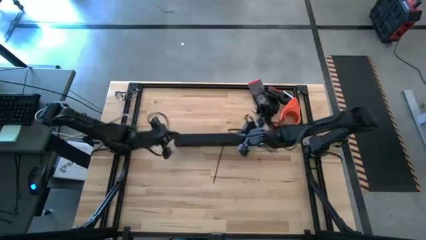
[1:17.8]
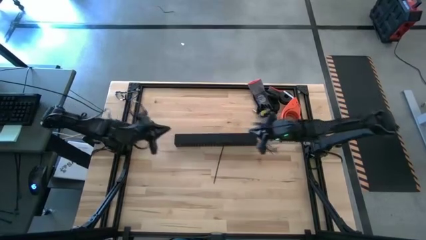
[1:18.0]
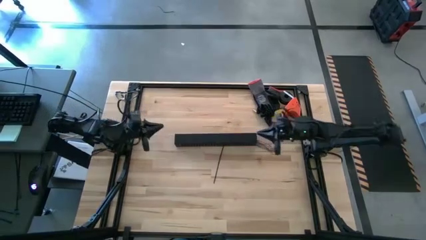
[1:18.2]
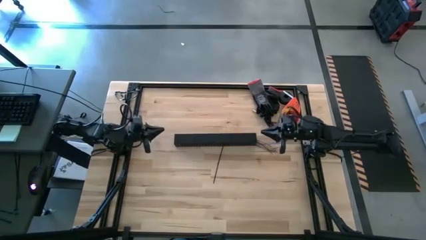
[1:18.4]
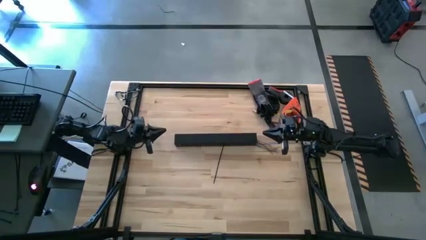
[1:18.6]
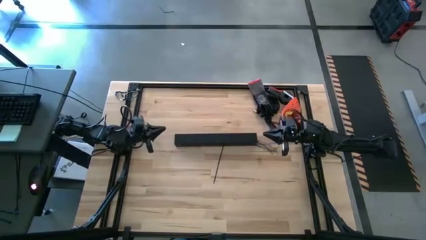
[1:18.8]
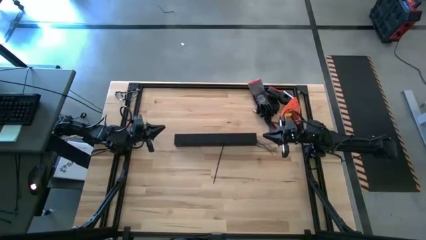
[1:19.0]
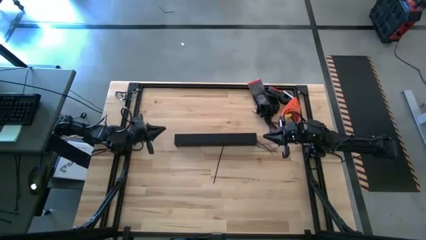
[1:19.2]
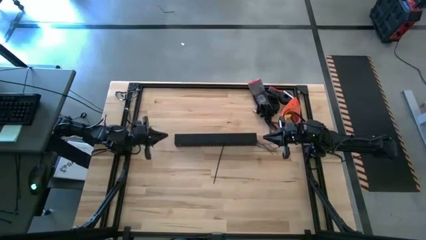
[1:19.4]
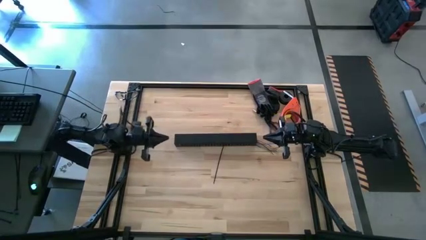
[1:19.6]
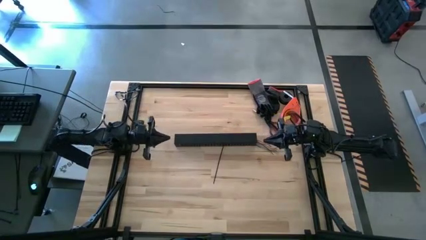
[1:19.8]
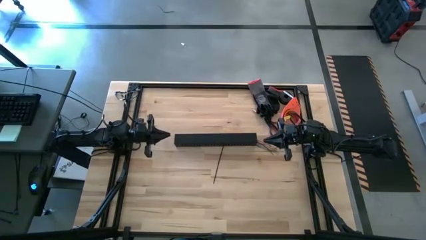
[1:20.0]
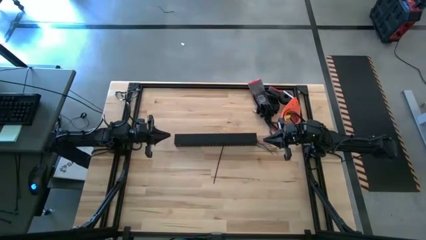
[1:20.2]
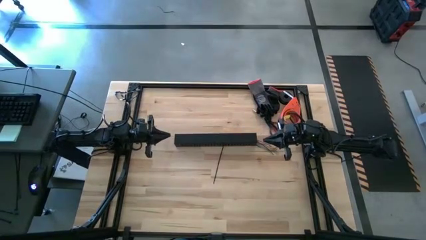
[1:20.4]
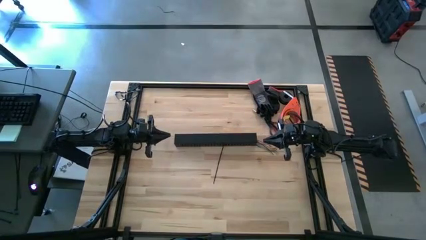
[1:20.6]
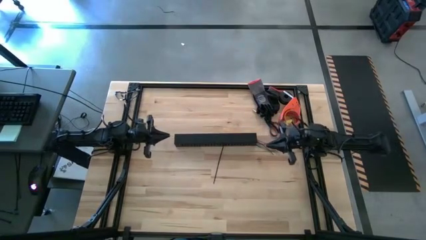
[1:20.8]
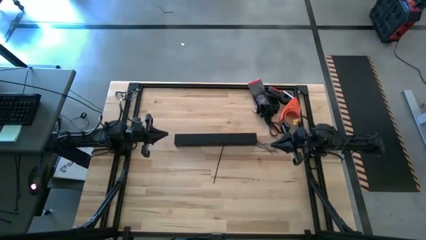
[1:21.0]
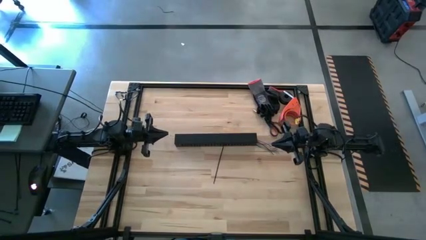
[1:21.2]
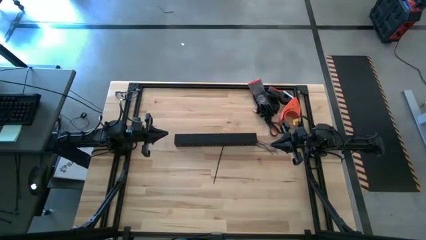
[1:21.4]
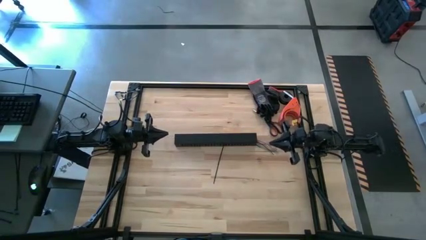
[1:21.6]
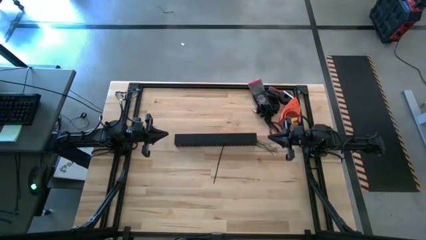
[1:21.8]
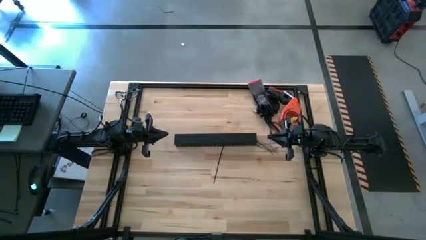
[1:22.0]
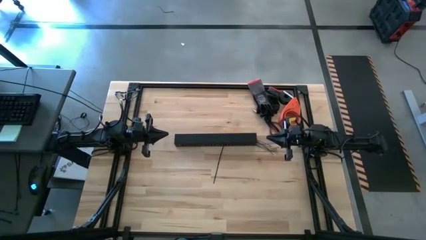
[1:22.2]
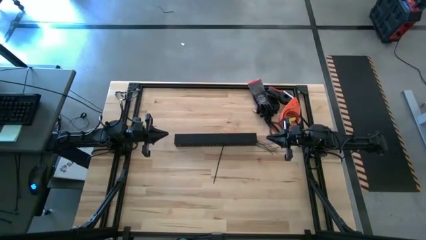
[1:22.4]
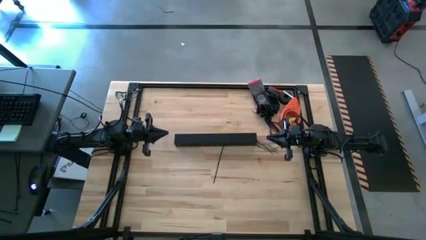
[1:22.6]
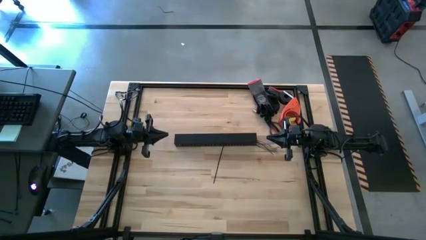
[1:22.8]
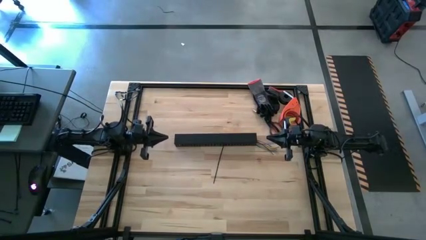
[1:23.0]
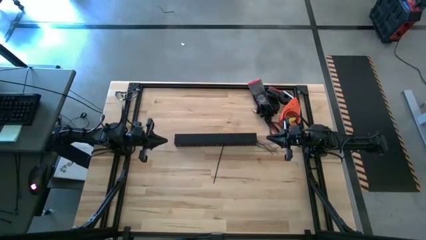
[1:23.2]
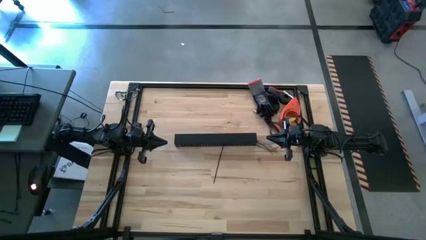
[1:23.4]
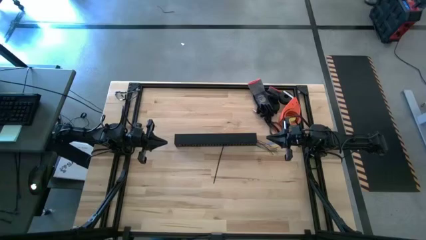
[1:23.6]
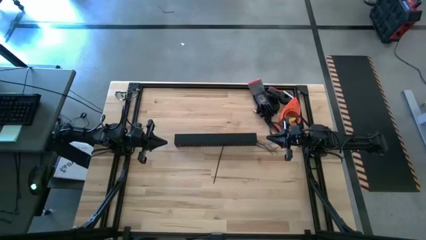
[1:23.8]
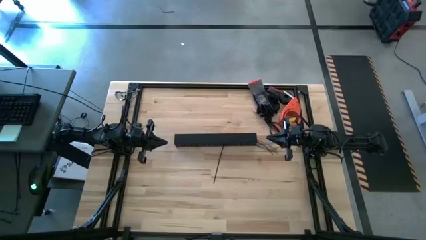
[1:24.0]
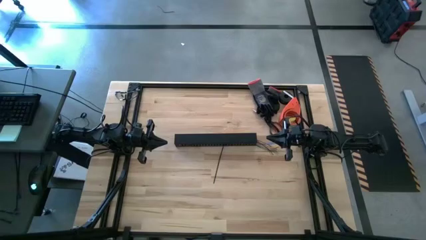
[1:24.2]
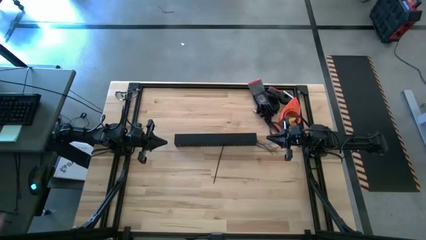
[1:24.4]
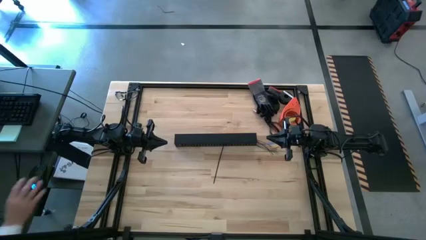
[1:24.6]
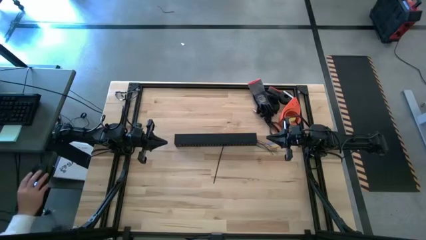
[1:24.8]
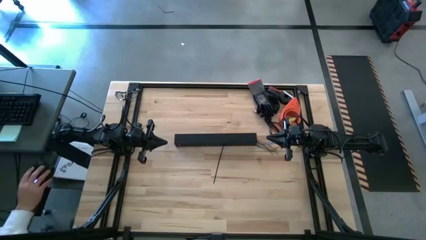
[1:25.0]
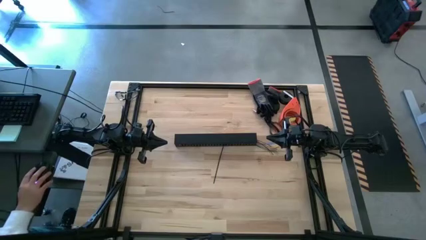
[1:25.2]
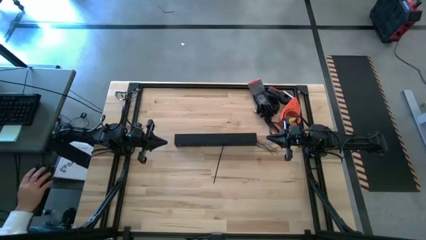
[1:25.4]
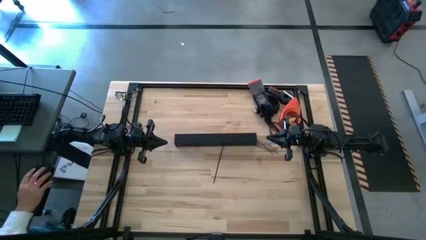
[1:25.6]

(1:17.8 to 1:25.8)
Task: Ziptie cables
Return to Home Position

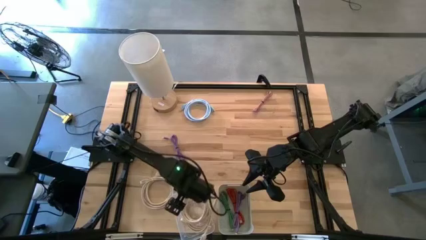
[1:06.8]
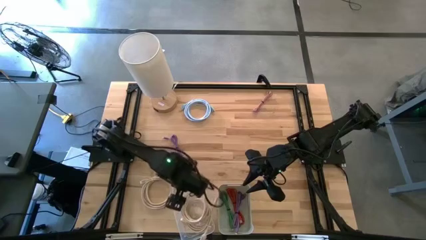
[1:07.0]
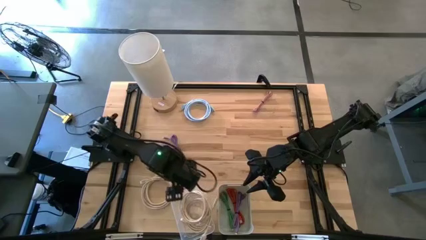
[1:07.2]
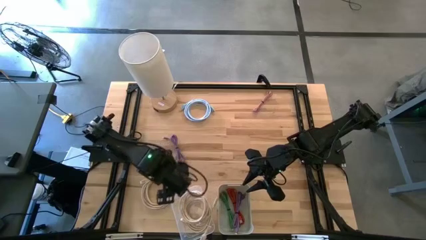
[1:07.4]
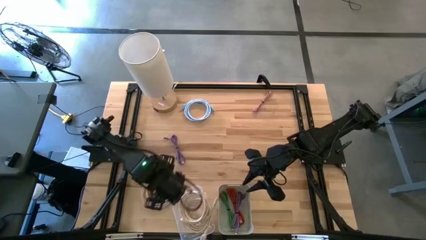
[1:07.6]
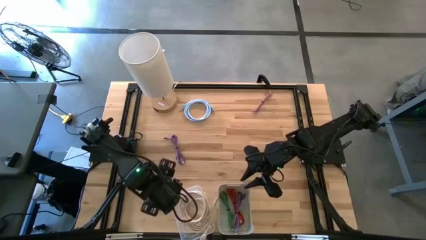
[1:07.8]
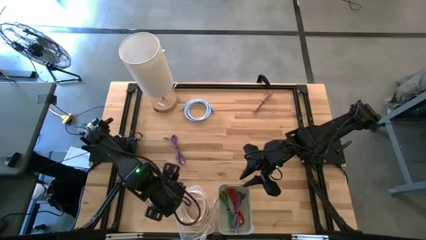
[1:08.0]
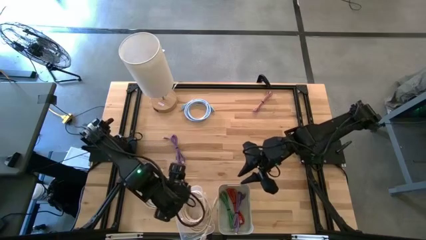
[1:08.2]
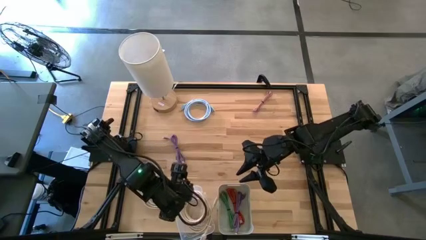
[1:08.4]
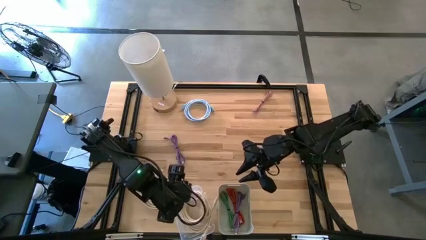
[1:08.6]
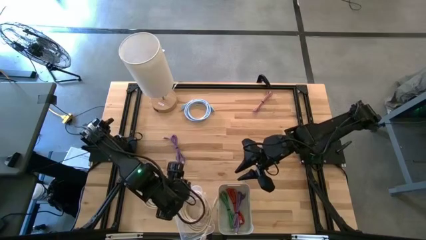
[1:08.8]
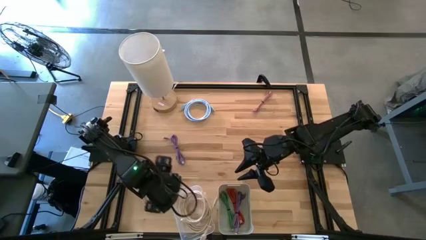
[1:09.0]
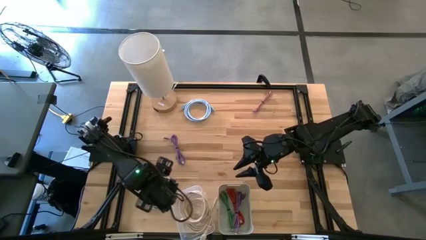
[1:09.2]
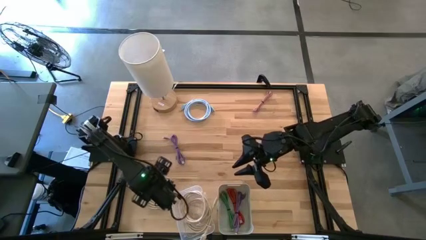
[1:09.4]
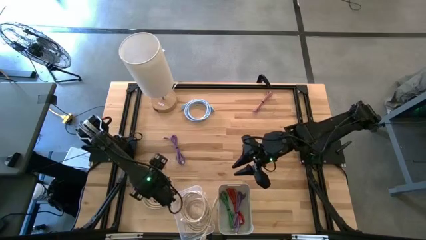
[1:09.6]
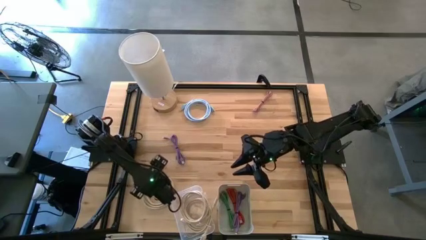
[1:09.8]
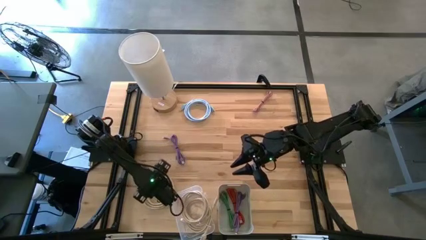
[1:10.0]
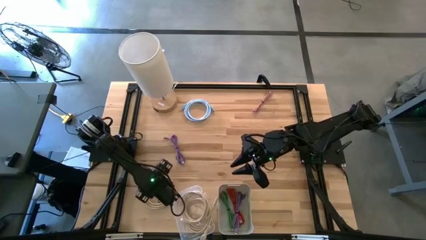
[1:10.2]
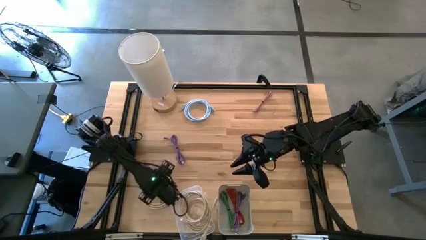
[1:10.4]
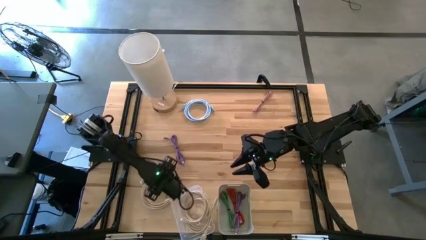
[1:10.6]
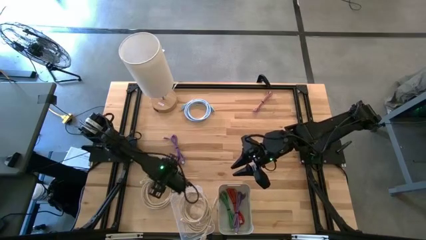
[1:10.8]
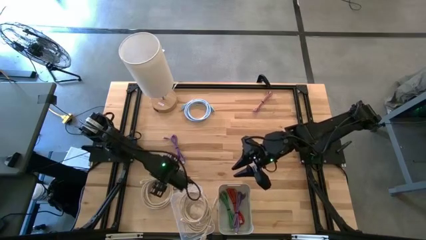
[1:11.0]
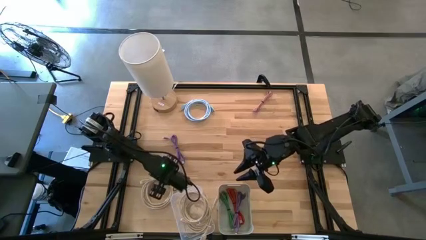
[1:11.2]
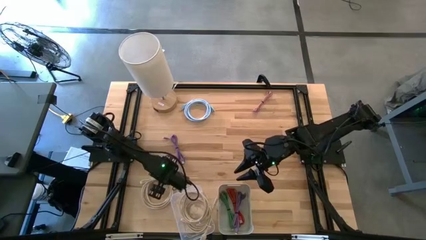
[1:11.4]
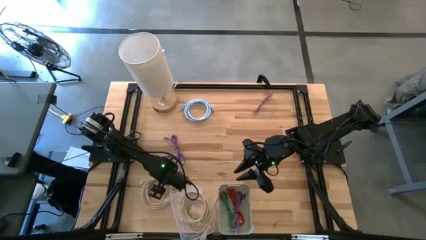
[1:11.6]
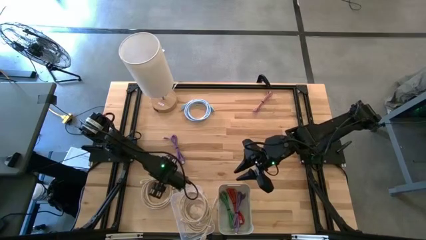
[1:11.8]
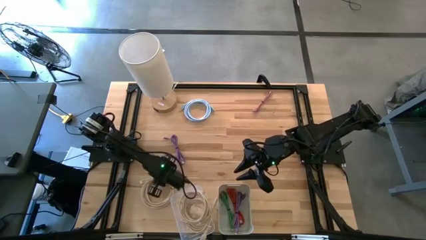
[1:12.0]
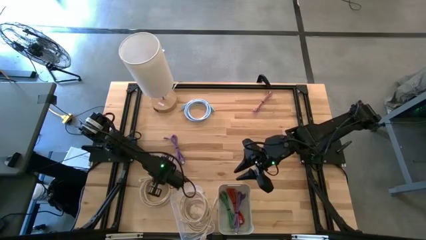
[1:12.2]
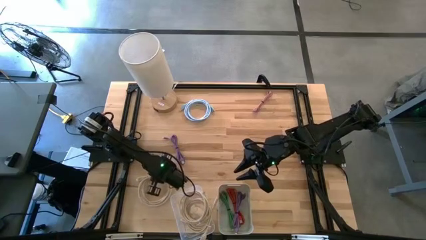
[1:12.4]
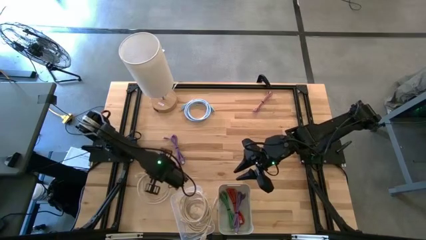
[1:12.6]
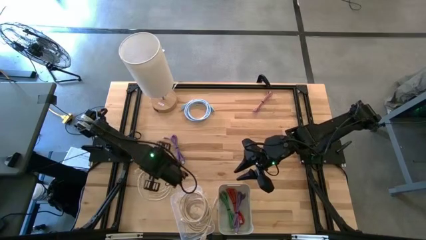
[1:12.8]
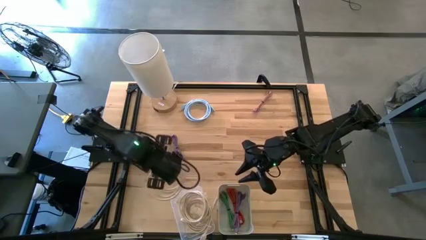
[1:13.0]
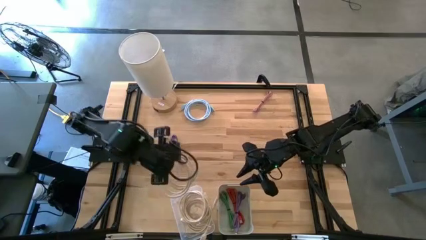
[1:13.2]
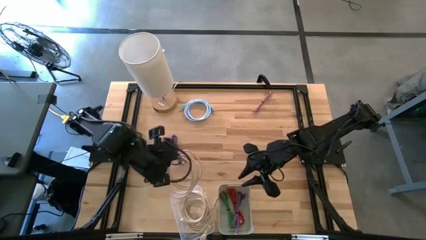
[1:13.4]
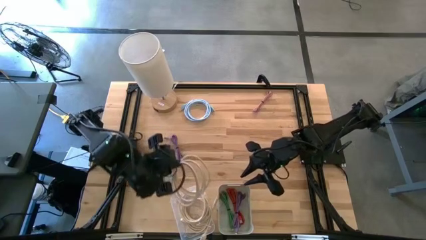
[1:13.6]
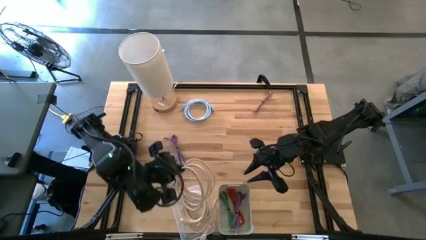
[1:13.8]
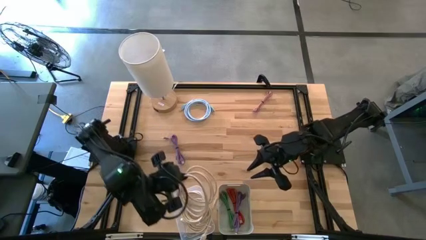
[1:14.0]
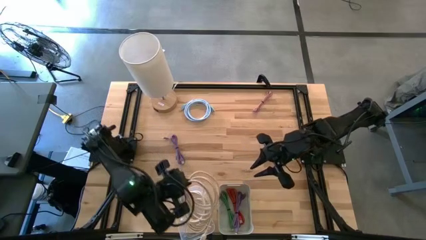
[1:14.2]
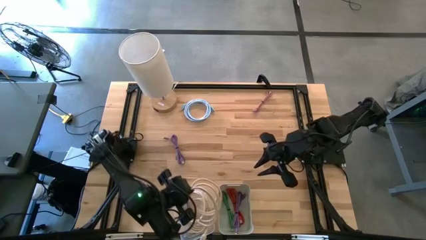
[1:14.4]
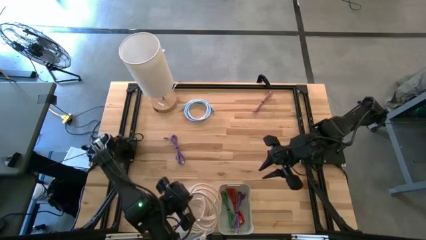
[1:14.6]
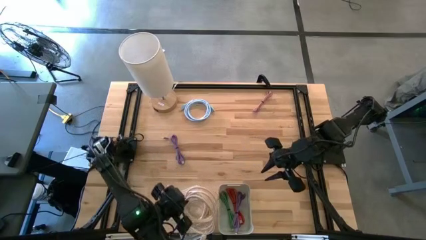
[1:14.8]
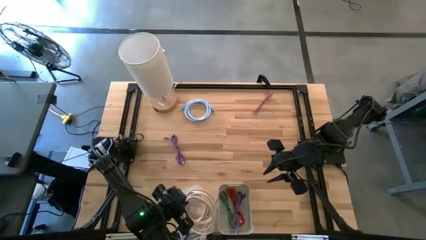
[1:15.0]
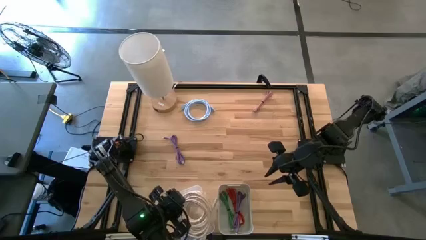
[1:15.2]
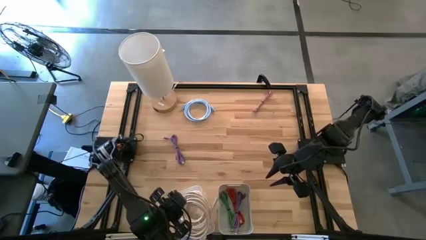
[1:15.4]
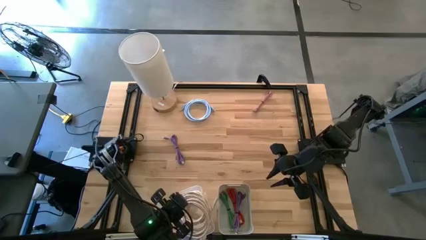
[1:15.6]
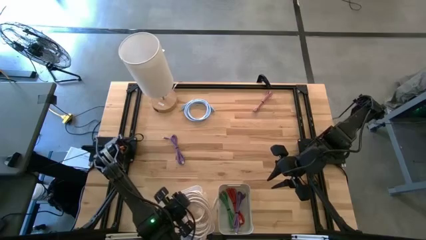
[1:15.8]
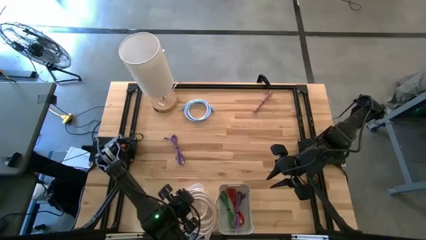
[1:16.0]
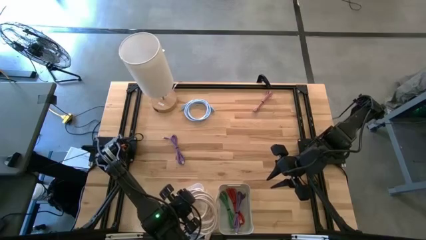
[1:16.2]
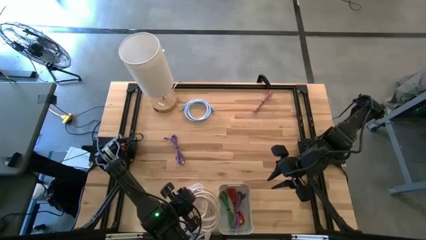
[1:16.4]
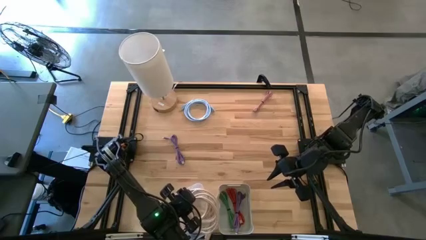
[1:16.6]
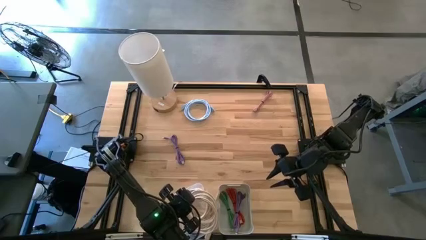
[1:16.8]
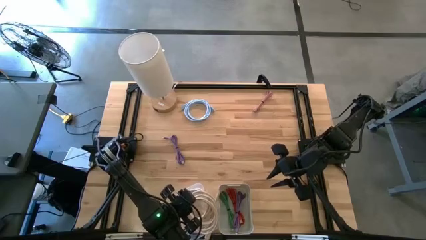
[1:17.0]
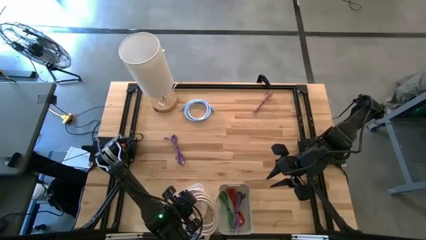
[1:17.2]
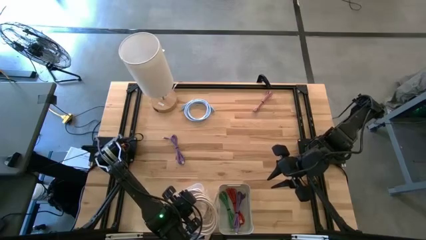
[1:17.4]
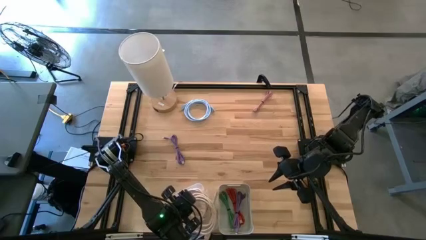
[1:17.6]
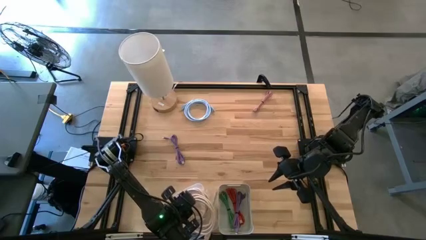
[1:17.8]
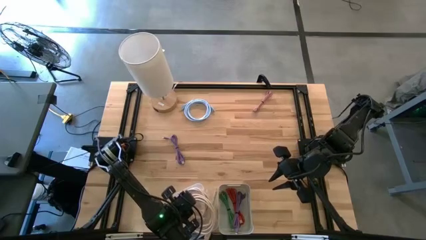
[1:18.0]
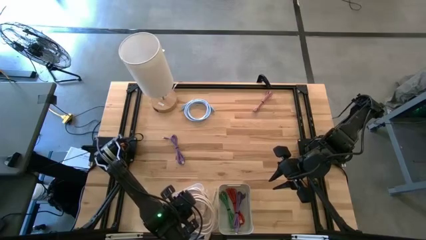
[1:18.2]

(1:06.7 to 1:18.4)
Task: Pick & Place USB Port
Put the brown HDMI cable into the transparent bin
